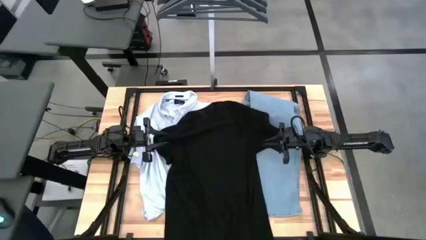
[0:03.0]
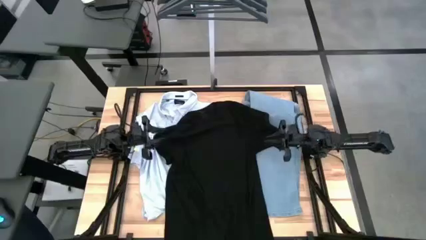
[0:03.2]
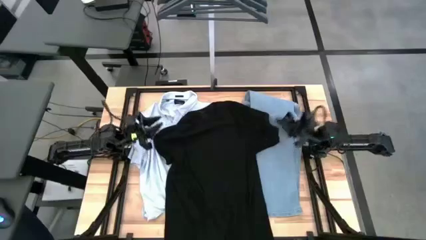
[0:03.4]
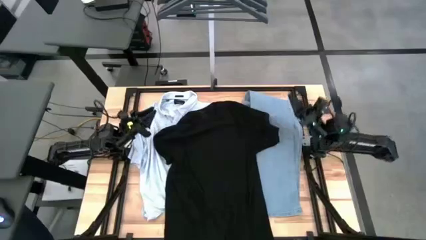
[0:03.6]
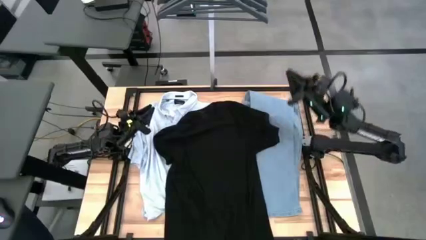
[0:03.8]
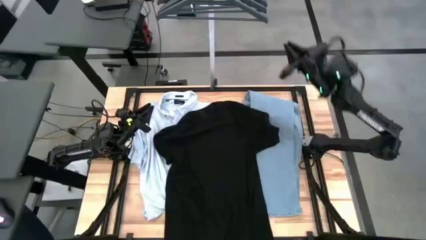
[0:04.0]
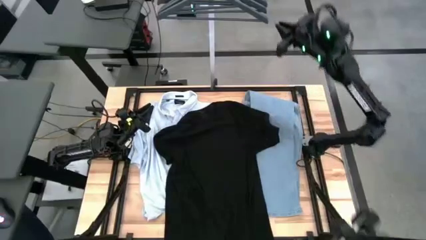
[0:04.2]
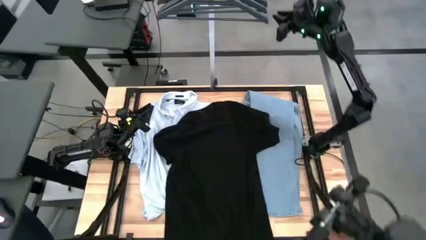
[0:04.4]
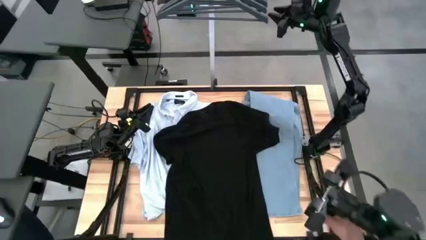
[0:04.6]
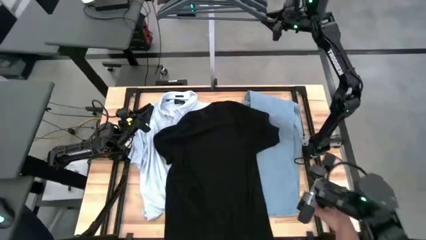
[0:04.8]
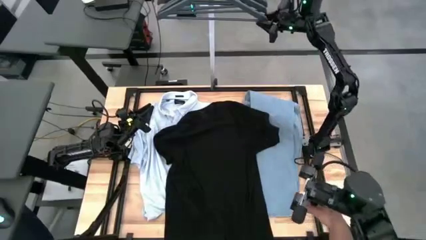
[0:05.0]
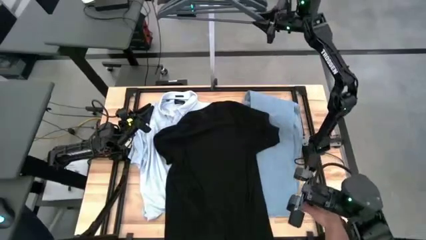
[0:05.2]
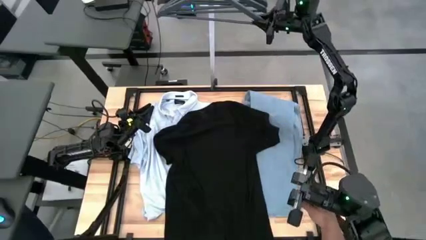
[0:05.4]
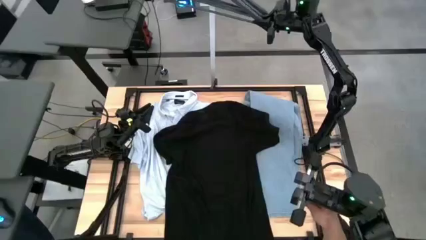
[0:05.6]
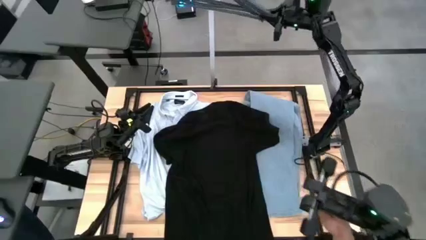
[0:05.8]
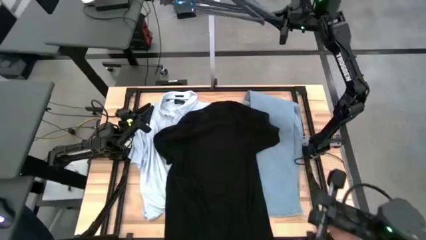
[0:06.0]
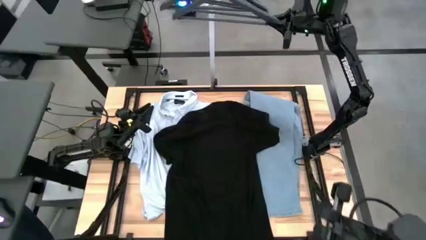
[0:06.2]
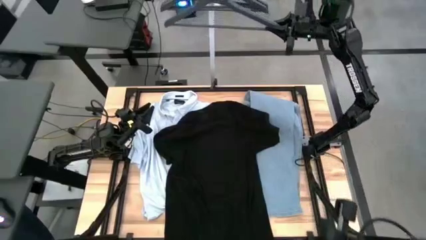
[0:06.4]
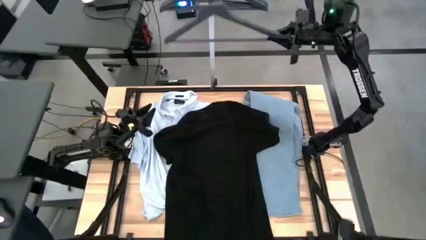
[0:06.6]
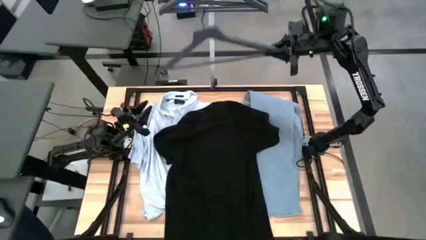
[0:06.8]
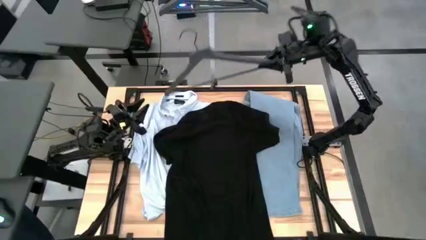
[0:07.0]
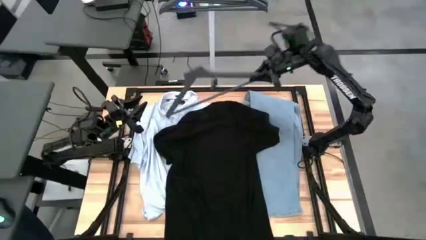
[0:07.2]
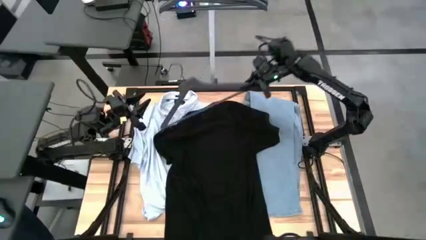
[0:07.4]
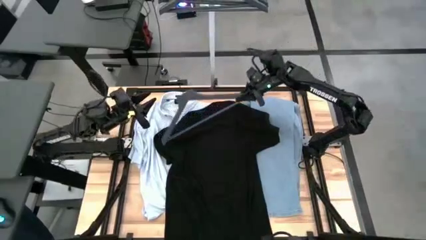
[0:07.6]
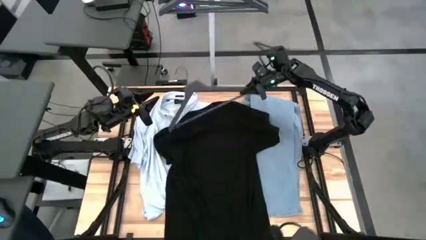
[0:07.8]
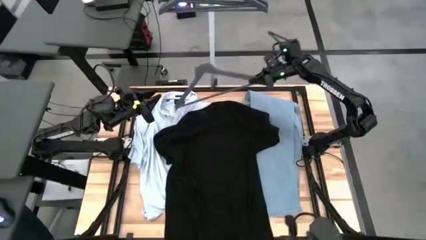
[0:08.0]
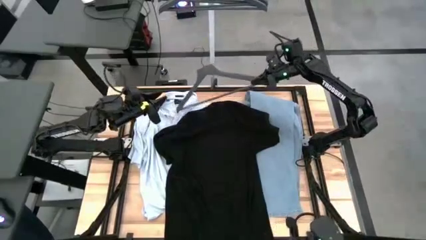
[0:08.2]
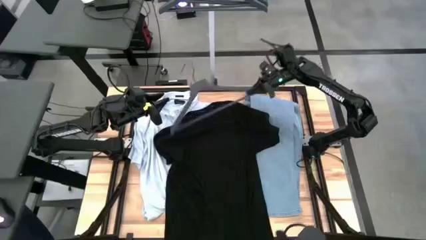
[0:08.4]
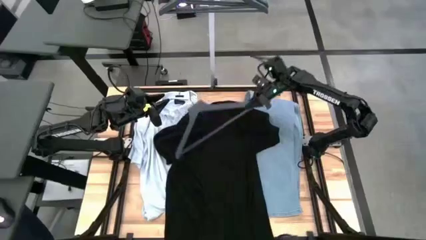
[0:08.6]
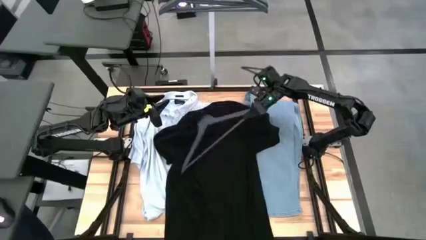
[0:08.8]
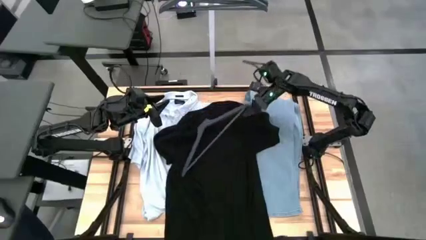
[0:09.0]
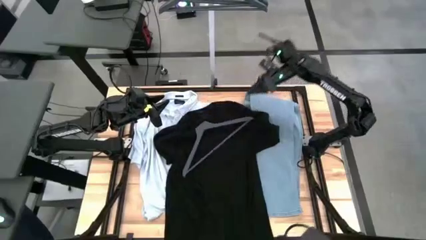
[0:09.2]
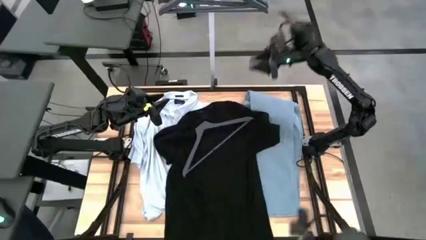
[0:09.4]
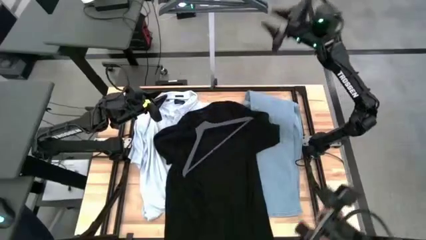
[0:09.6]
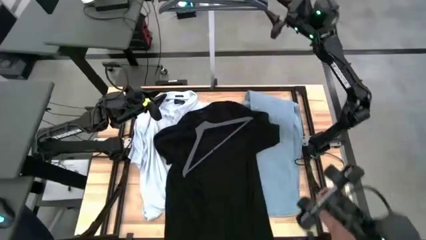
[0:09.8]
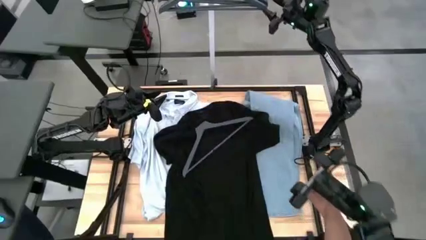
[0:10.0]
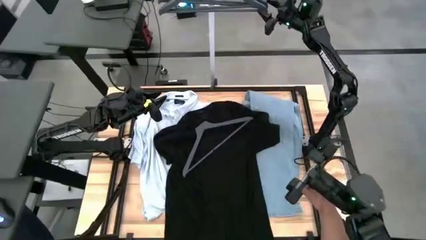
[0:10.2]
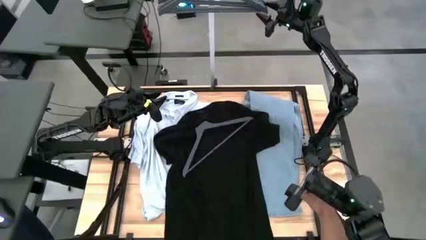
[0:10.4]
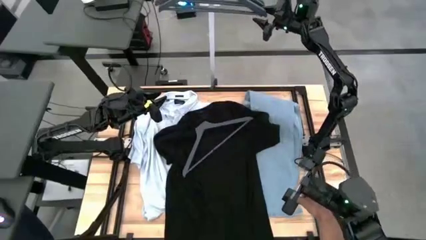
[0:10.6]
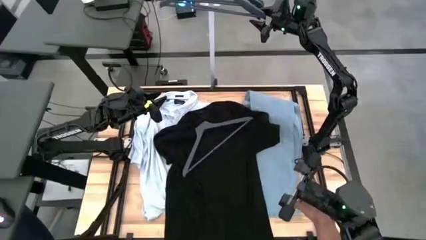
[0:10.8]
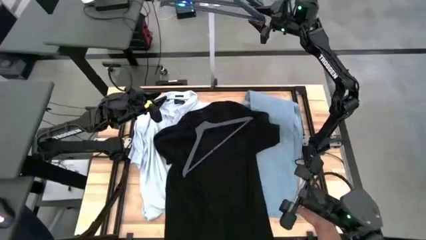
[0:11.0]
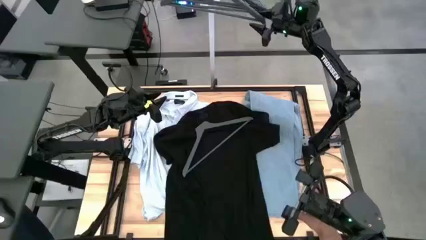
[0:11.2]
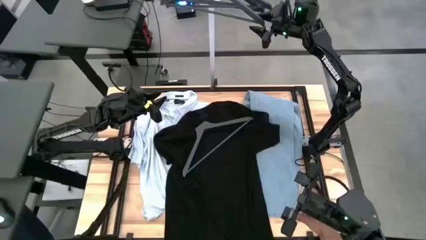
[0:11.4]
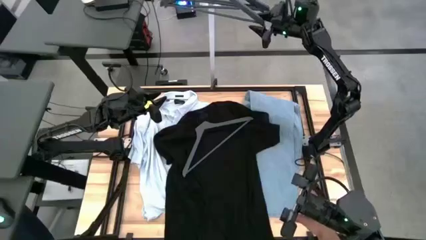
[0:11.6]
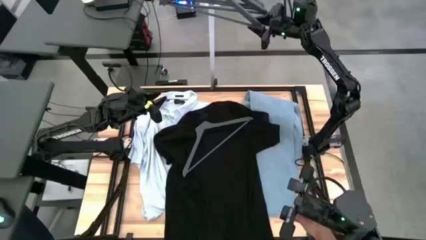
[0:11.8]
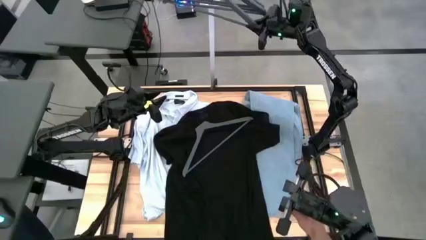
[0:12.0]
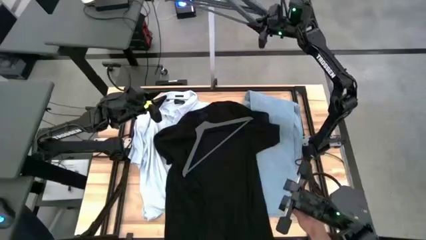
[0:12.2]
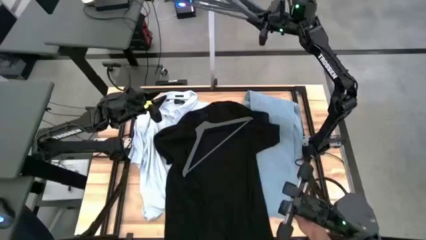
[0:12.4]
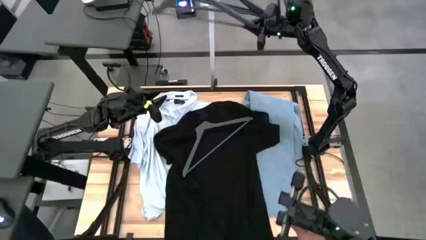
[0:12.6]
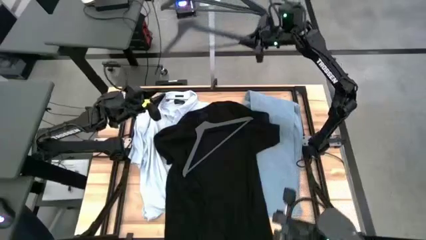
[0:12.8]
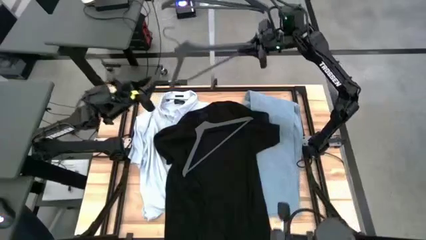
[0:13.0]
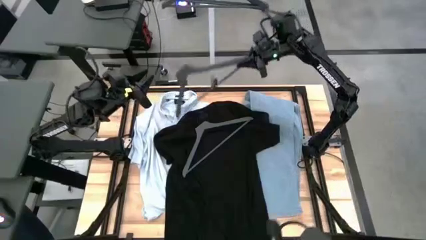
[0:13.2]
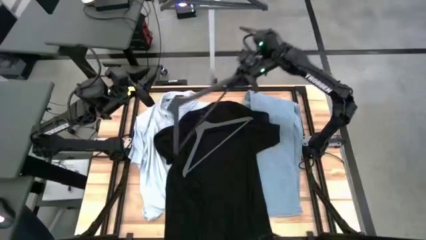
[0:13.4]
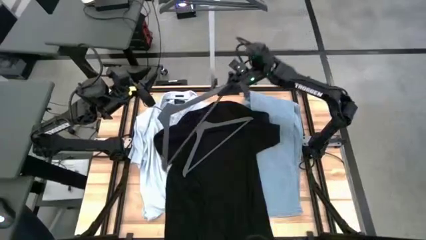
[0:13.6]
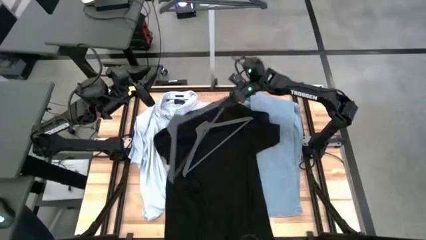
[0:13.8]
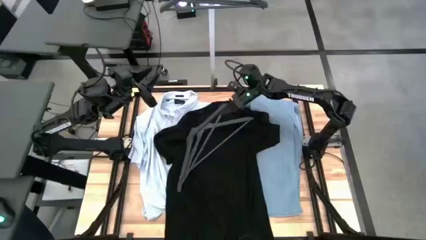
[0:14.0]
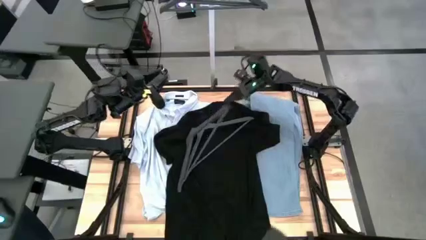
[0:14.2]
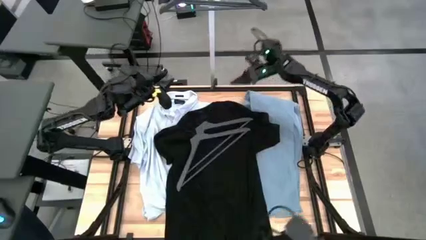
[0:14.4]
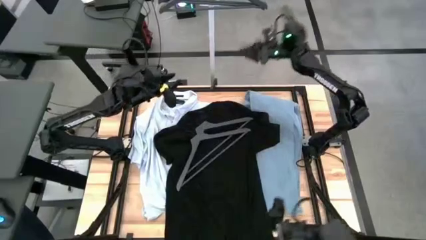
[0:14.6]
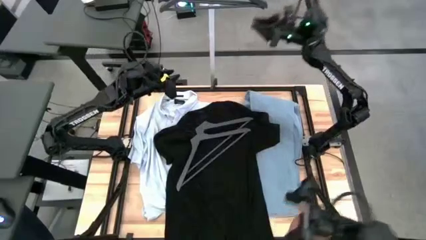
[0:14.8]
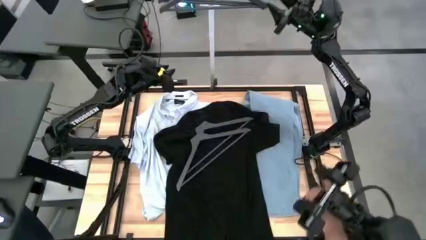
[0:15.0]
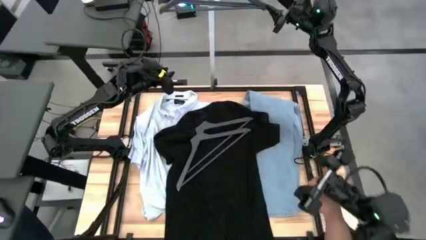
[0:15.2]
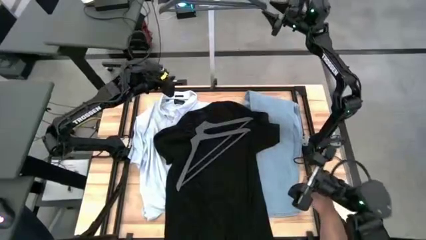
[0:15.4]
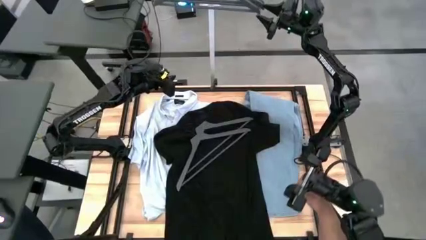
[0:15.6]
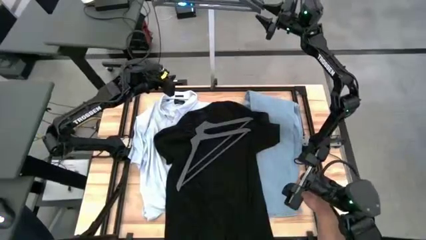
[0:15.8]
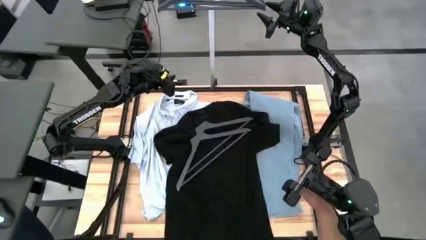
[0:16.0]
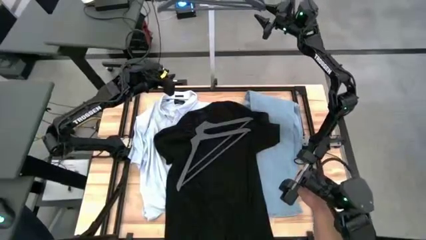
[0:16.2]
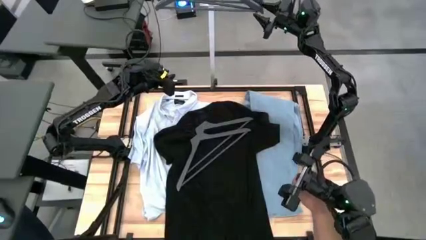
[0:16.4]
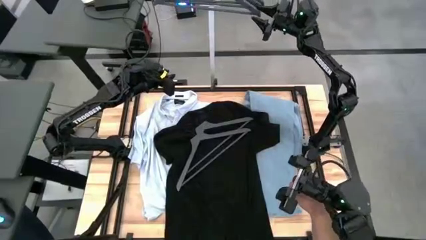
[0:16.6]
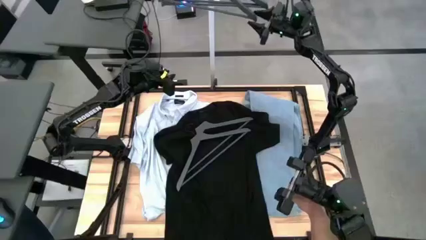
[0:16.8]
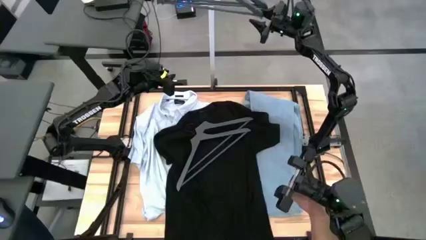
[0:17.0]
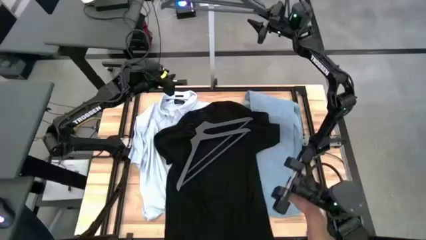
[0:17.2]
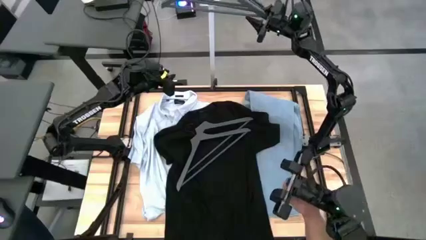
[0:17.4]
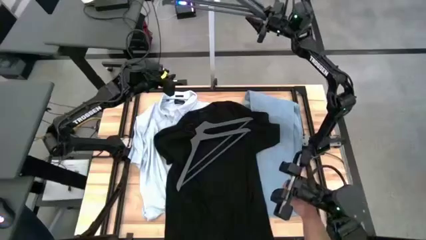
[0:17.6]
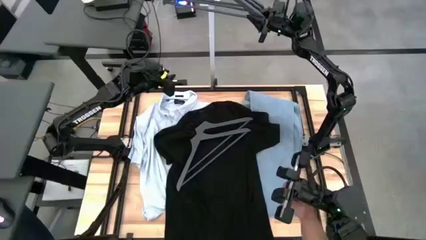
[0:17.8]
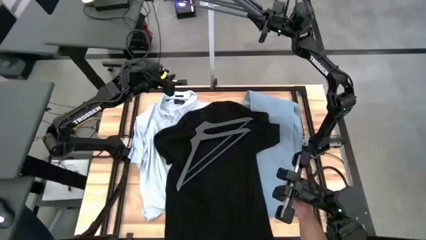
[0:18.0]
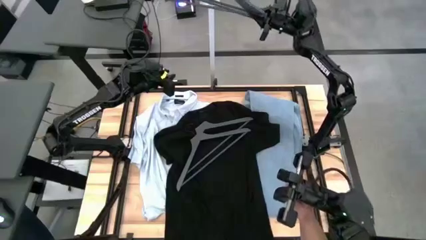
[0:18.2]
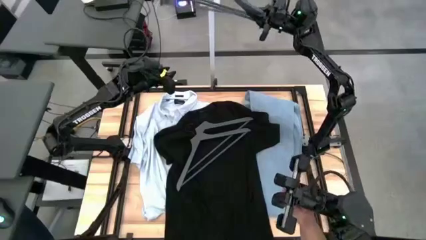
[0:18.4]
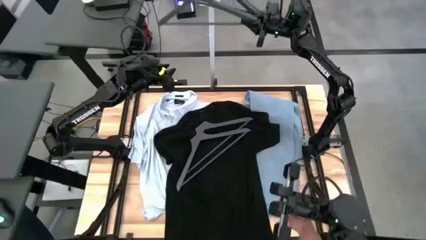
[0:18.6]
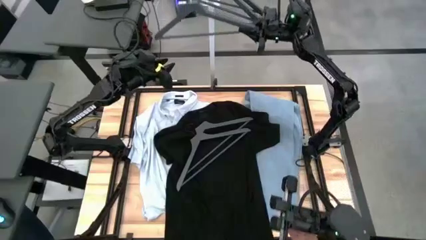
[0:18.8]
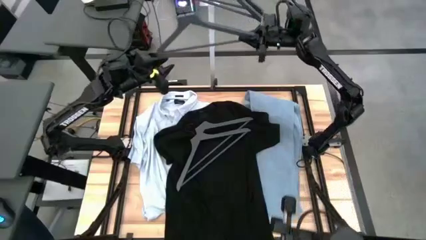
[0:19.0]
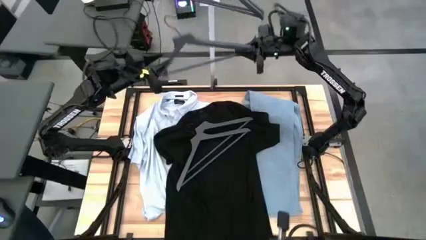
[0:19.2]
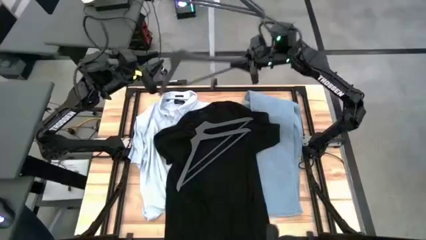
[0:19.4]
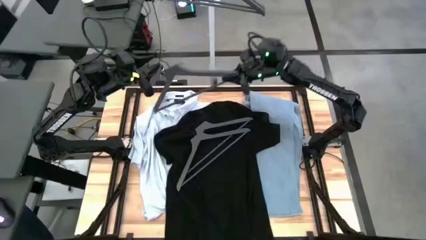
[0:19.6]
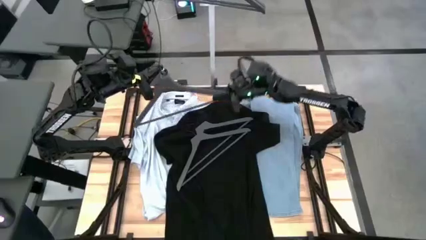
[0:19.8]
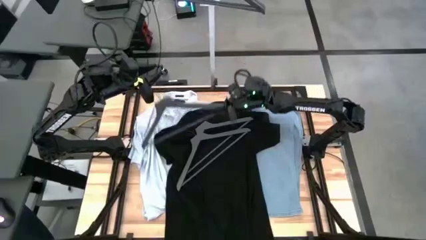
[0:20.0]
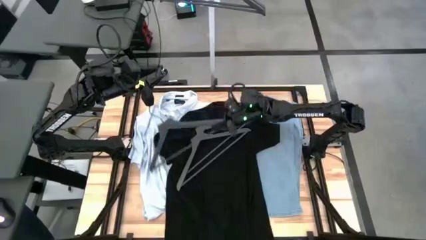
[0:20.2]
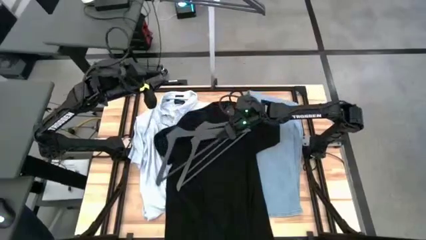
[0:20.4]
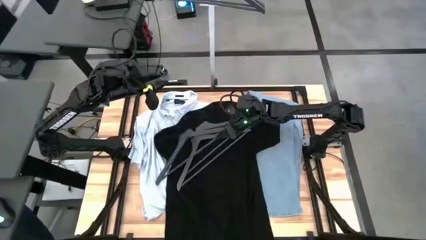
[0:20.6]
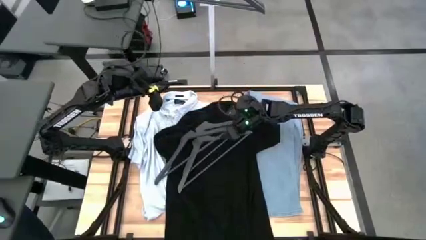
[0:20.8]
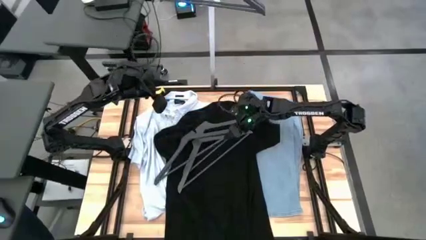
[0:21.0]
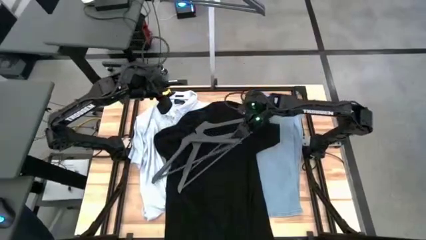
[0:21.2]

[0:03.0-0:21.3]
Task: Hang clothes
Unhang the grey hanger from the rack
